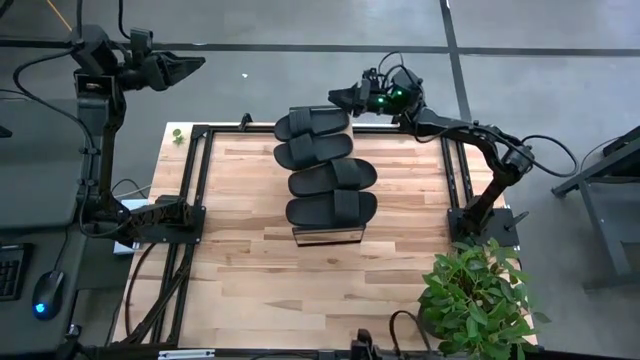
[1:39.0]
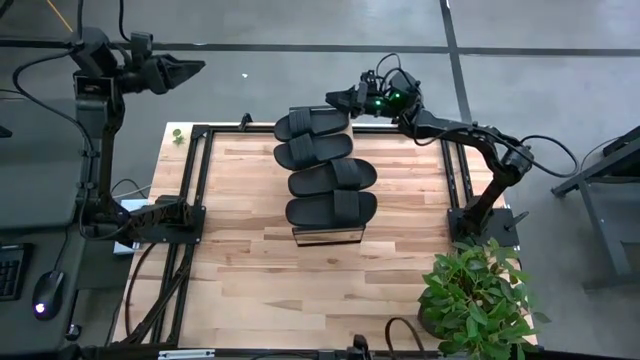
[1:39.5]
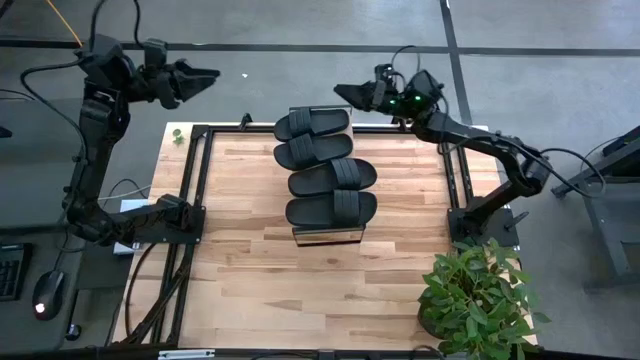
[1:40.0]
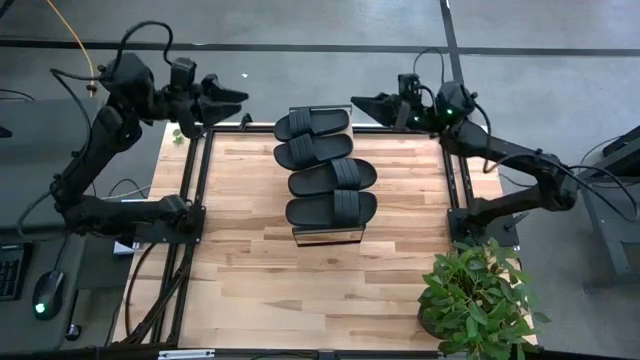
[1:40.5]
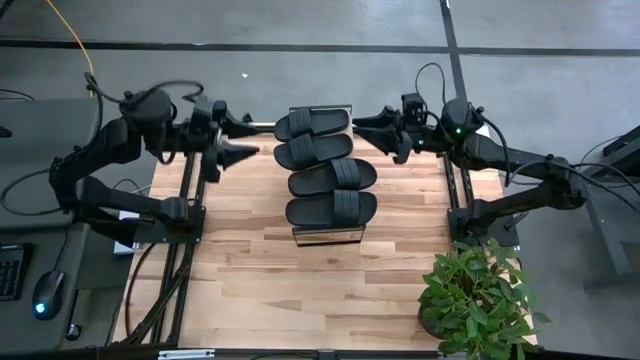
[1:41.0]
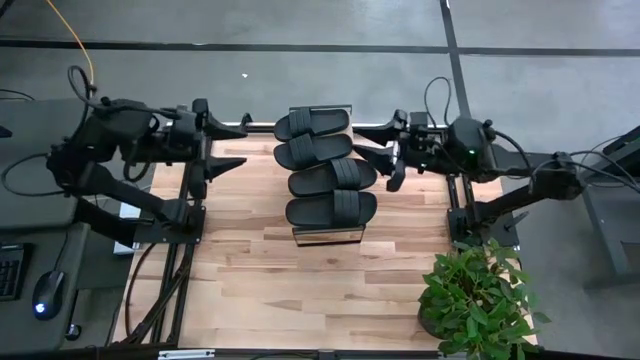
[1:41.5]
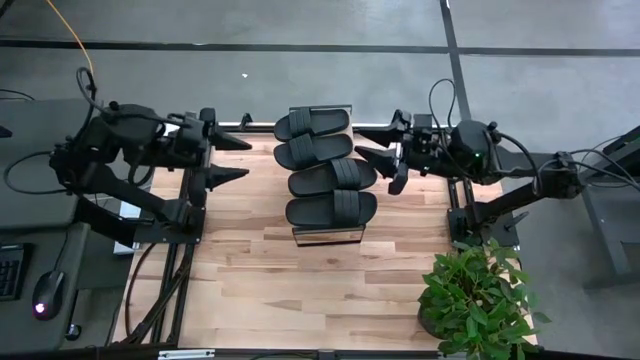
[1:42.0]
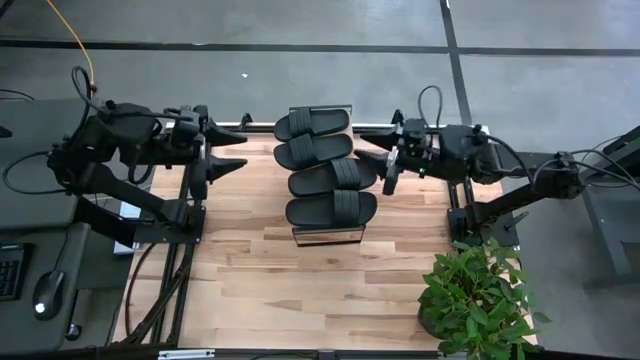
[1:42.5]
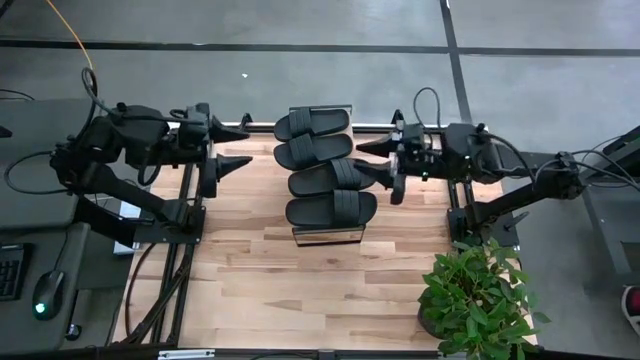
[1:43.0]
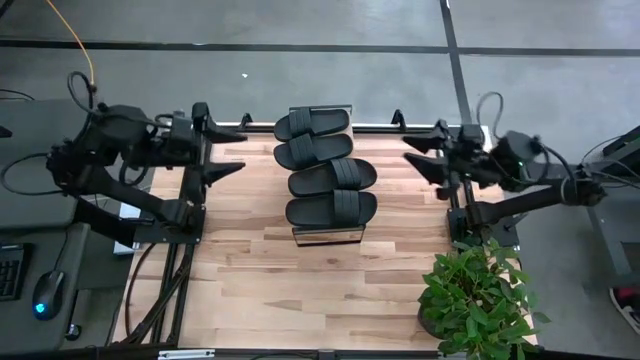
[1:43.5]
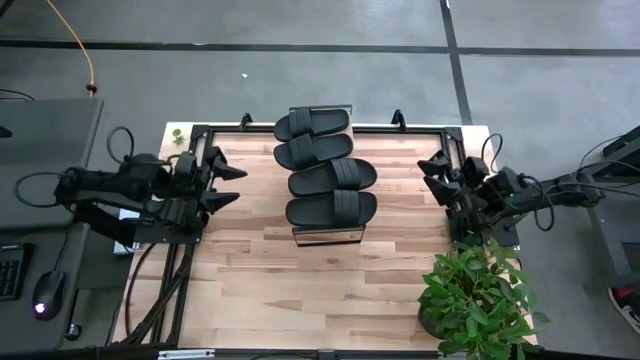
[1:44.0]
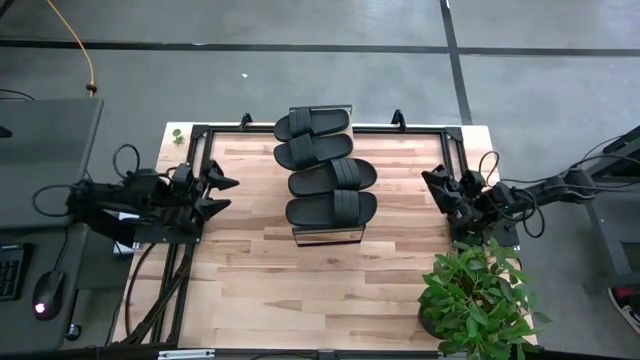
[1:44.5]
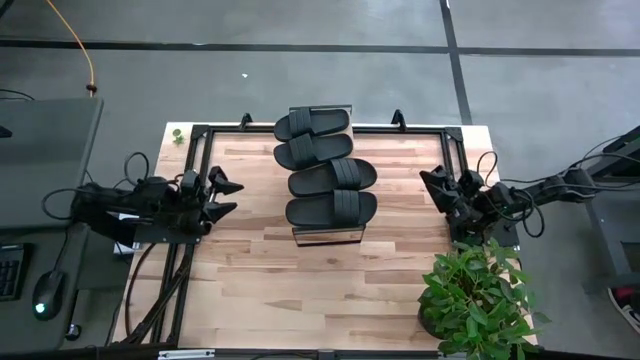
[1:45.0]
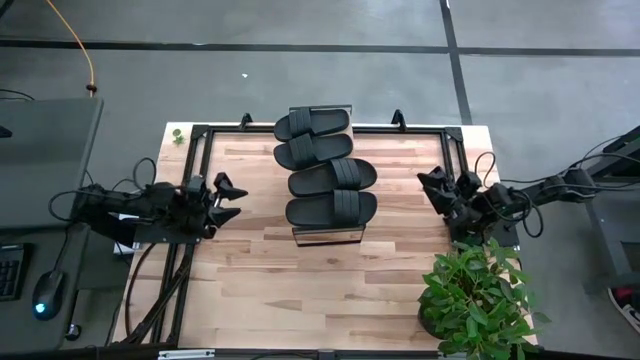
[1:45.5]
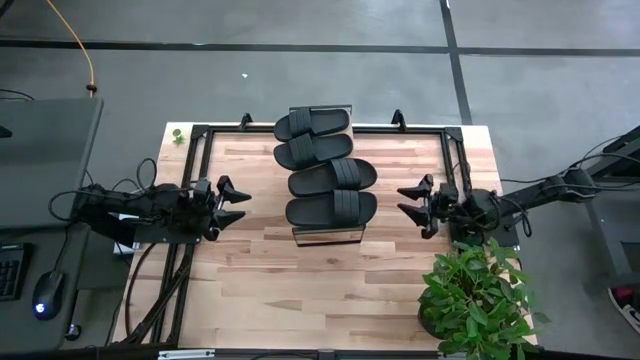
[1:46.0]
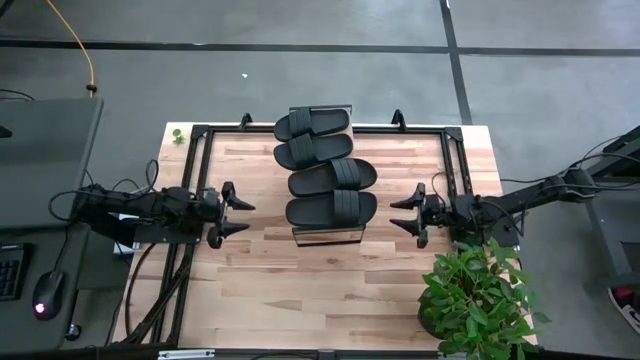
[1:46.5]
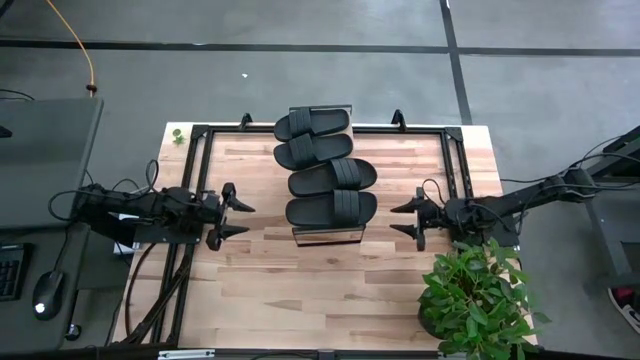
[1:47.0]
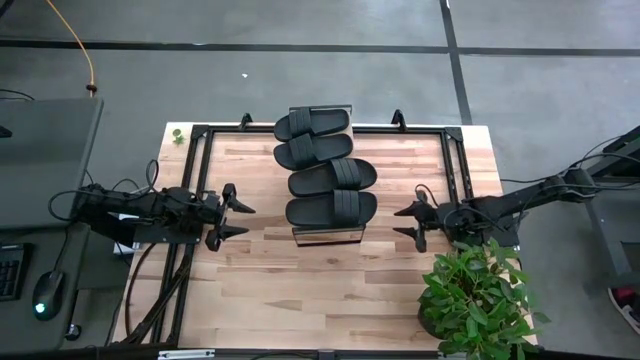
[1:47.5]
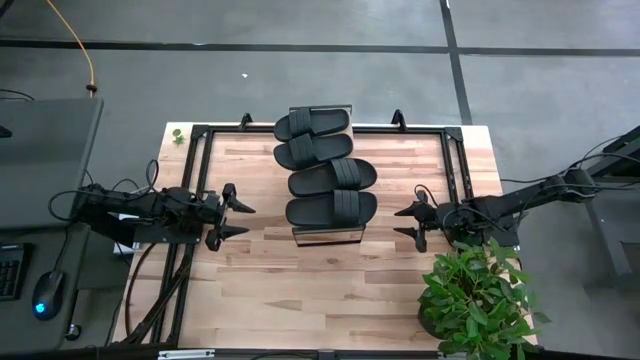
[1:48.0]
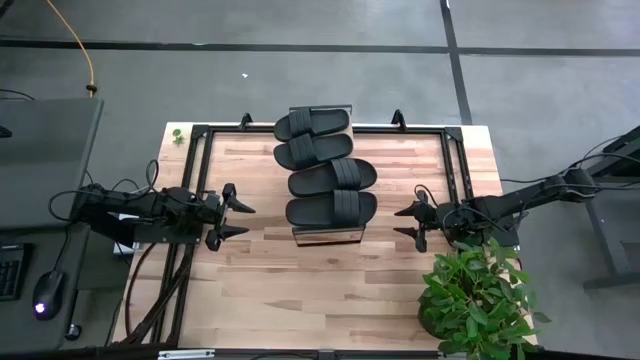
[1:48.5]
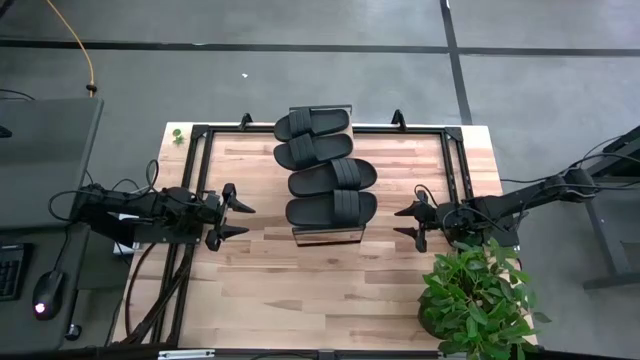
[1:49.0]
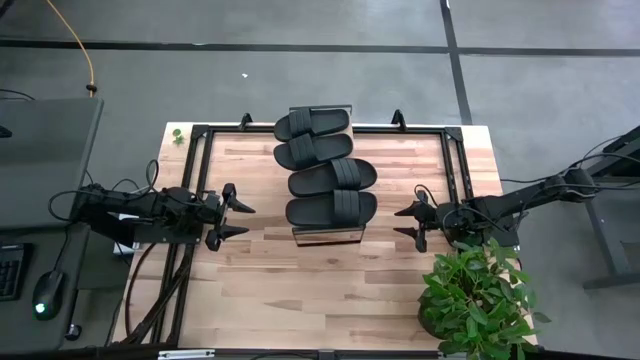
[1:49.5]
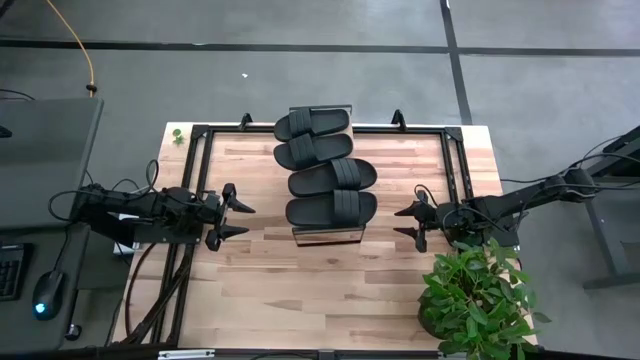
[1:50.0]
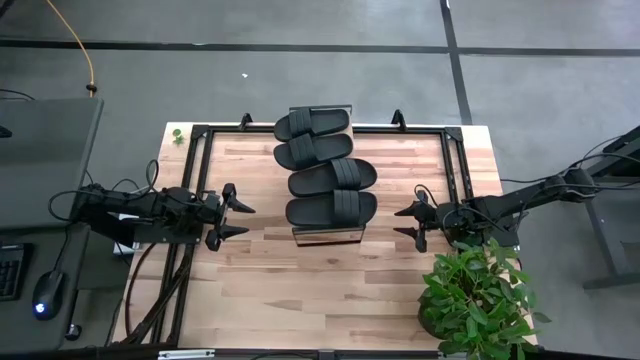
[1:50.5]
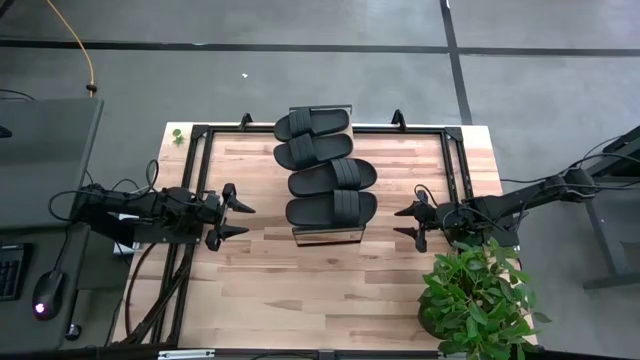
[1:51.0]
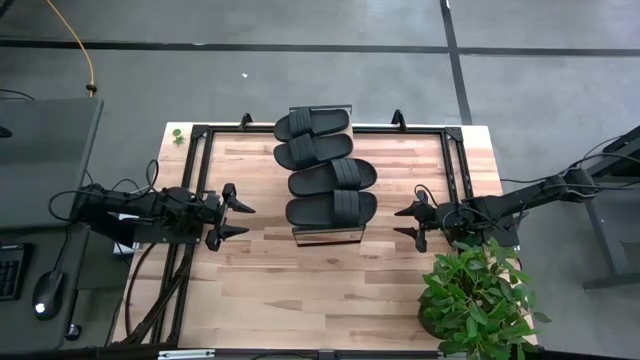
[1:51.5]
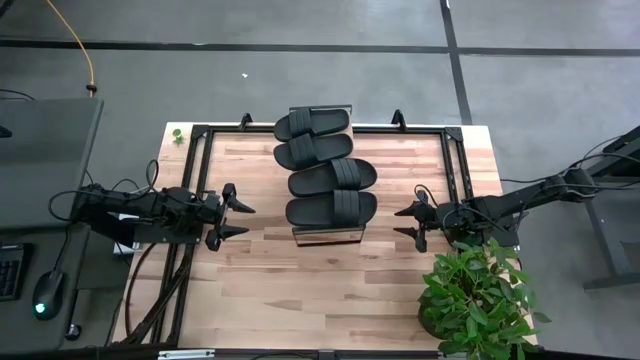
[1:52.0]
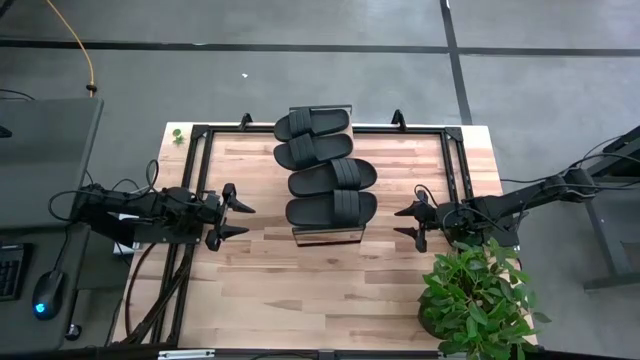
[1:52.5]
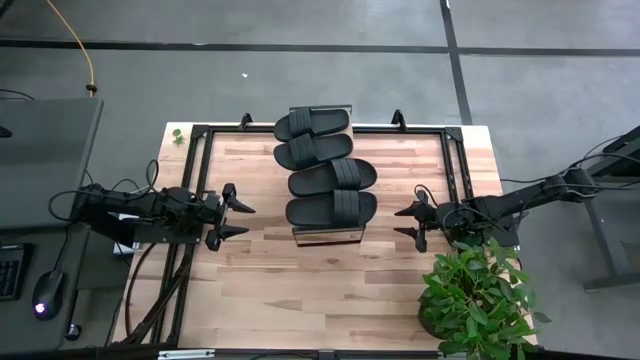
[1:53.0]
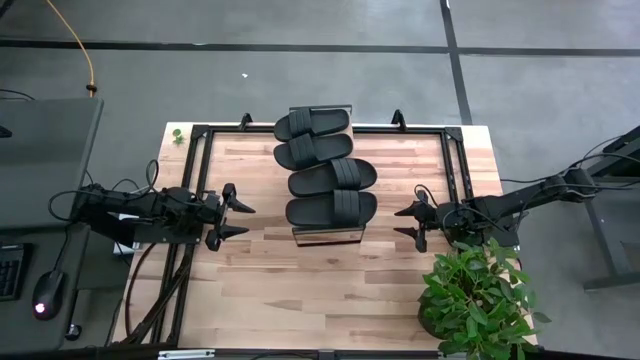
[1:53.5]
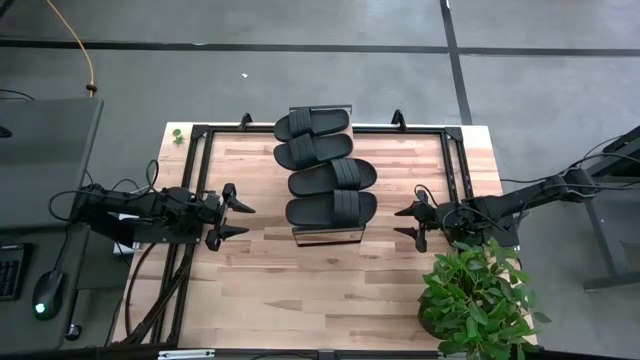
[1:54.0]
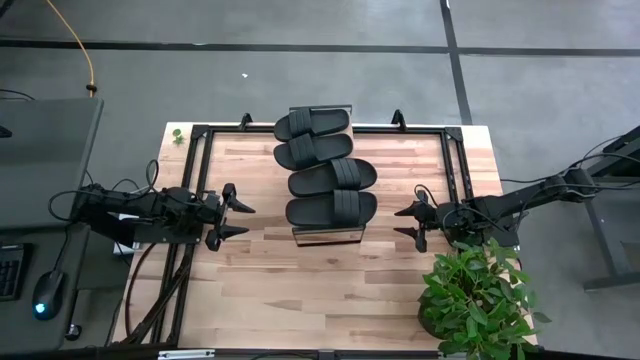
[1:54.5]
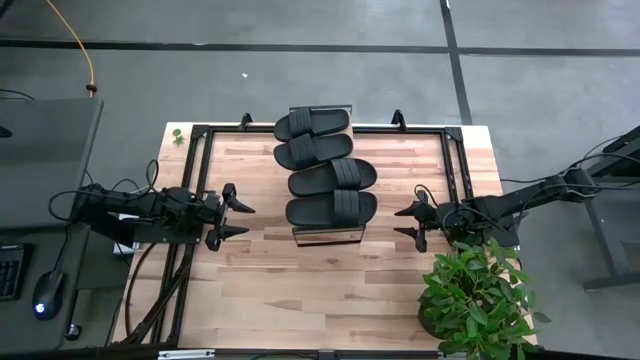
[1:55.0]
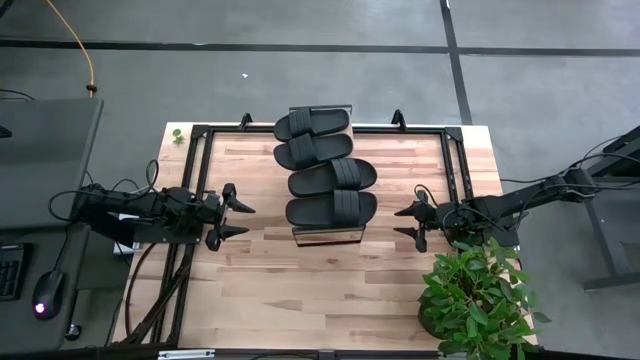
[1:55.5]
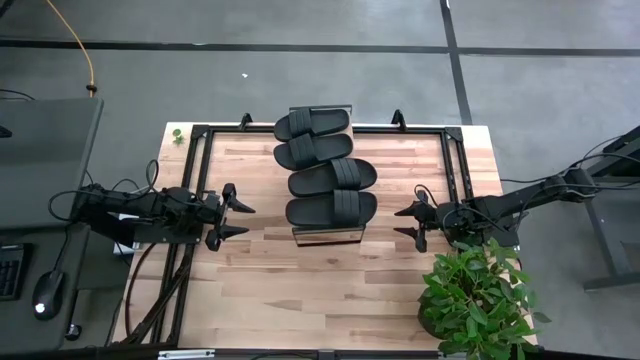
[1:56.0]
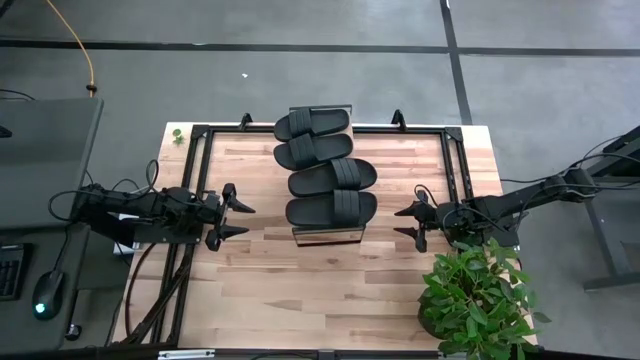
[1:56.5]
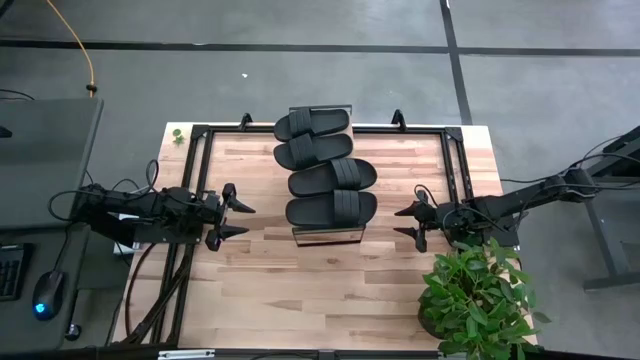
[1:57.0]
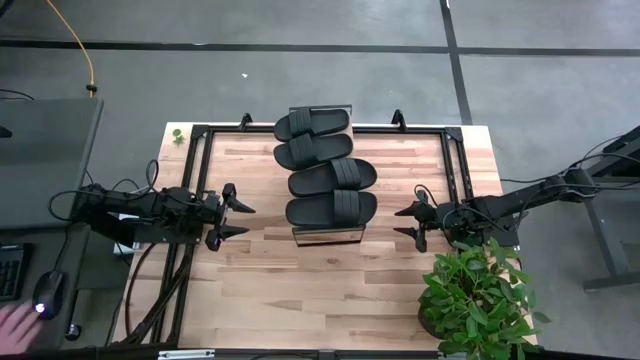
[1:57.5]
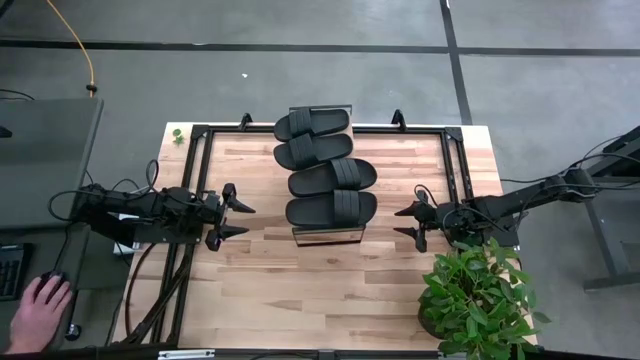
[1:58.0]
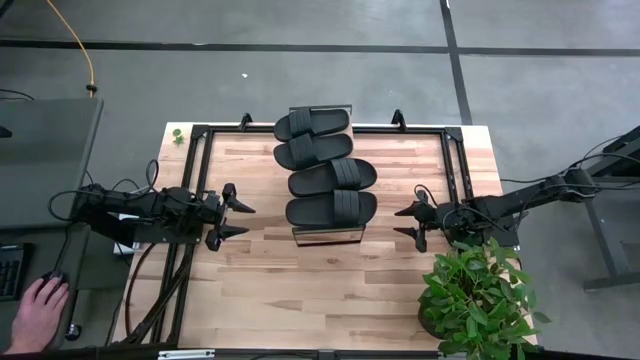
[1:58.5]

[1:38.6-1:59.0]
Task: Pick and place slides into the shelf
Return to Home Position
